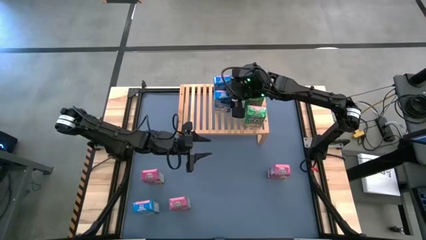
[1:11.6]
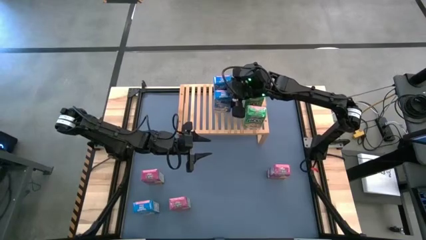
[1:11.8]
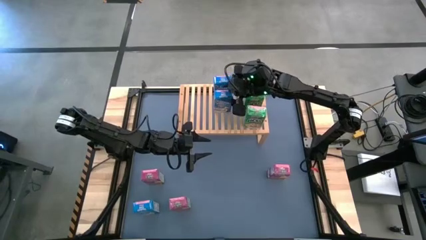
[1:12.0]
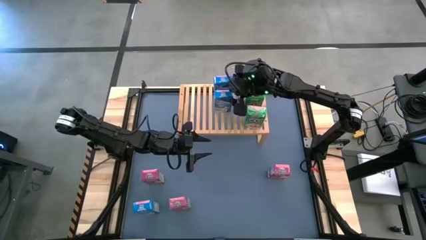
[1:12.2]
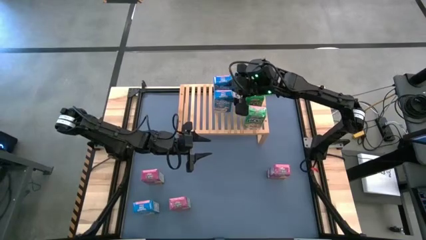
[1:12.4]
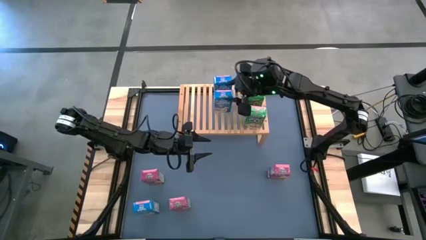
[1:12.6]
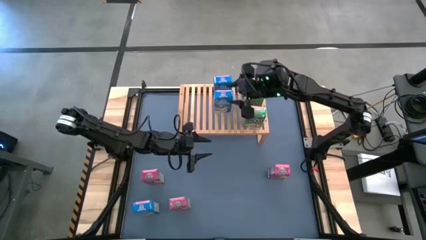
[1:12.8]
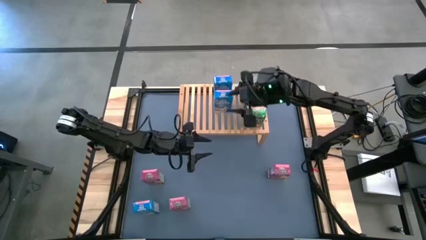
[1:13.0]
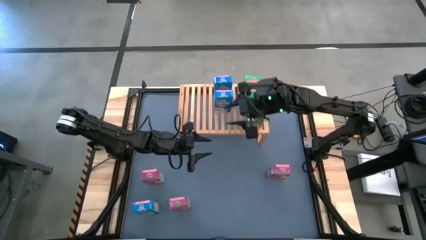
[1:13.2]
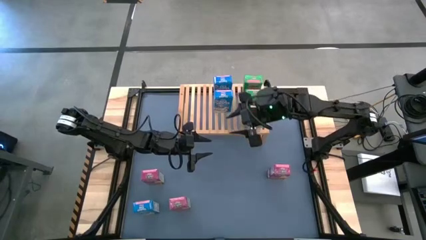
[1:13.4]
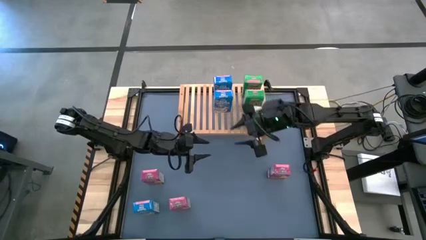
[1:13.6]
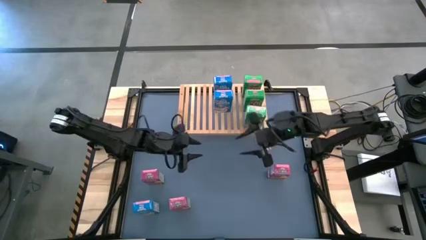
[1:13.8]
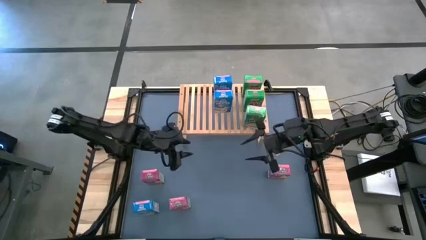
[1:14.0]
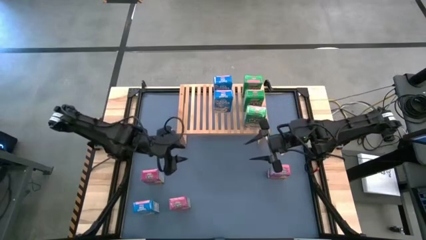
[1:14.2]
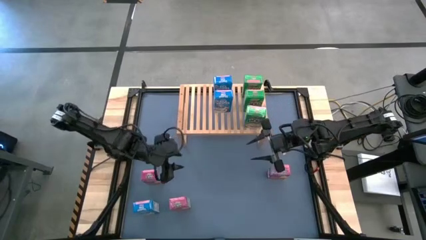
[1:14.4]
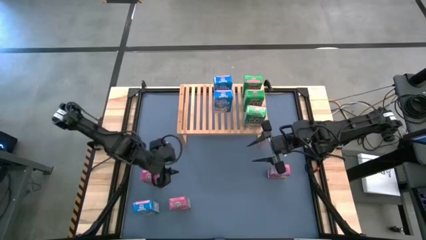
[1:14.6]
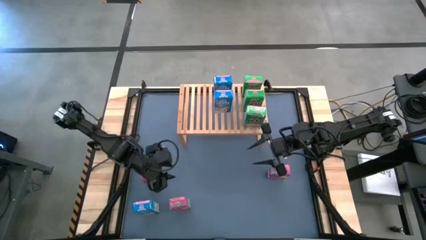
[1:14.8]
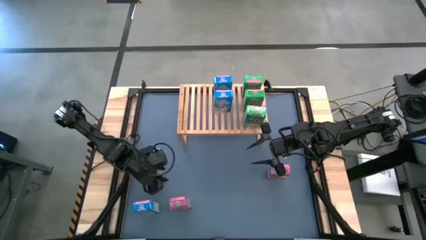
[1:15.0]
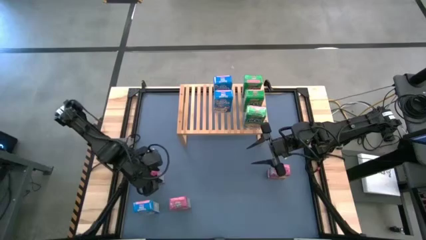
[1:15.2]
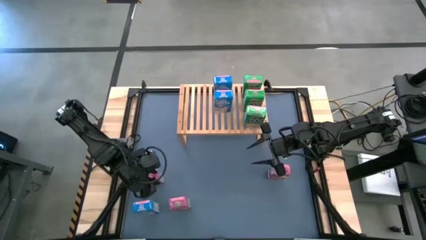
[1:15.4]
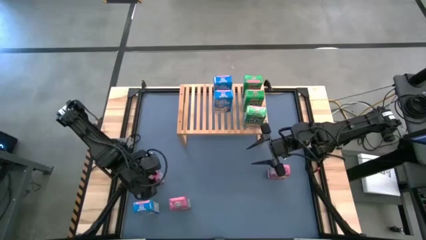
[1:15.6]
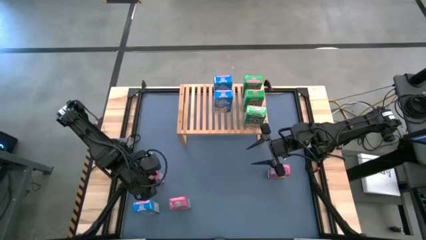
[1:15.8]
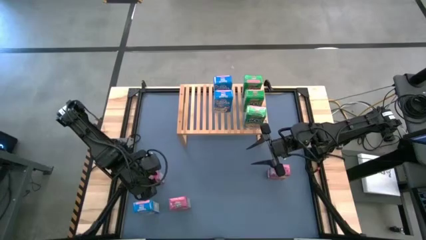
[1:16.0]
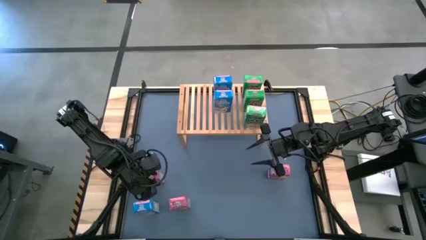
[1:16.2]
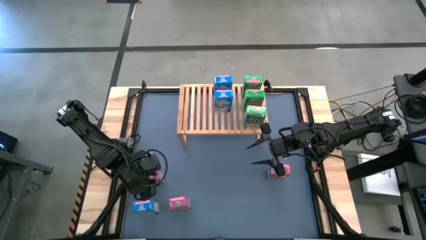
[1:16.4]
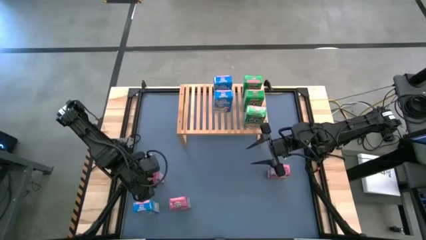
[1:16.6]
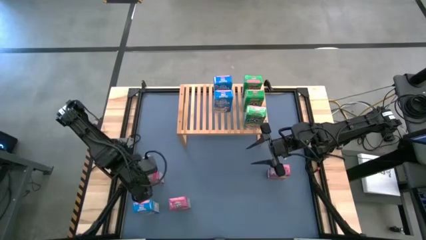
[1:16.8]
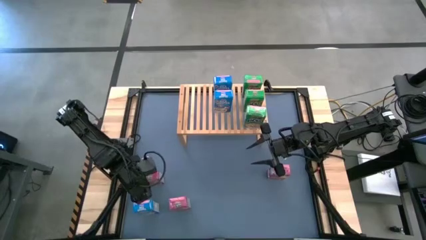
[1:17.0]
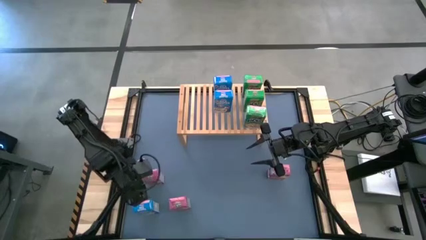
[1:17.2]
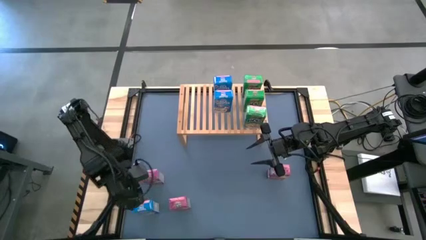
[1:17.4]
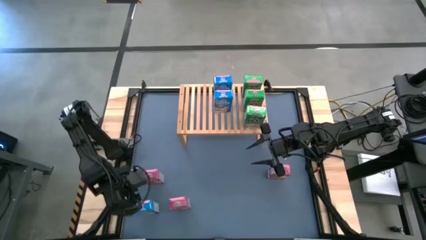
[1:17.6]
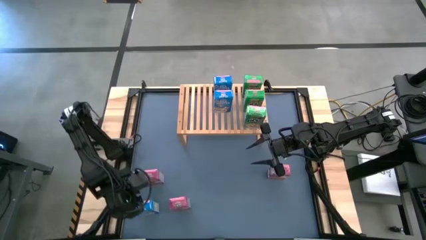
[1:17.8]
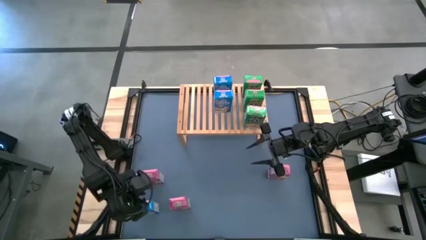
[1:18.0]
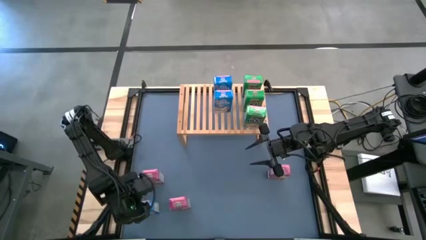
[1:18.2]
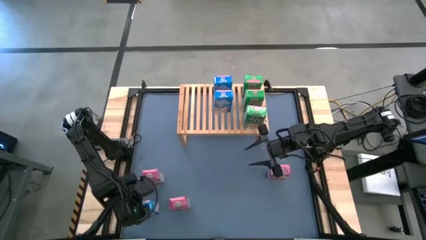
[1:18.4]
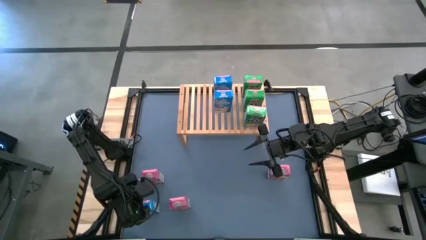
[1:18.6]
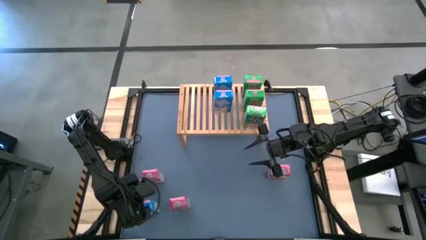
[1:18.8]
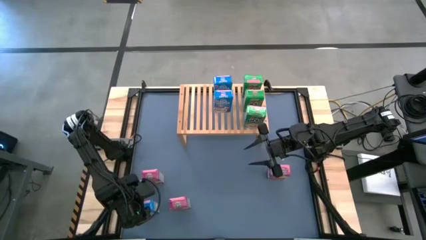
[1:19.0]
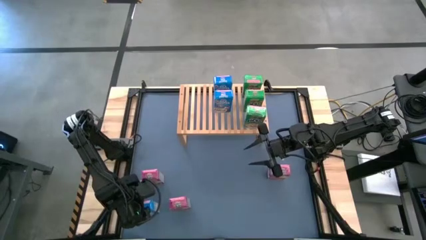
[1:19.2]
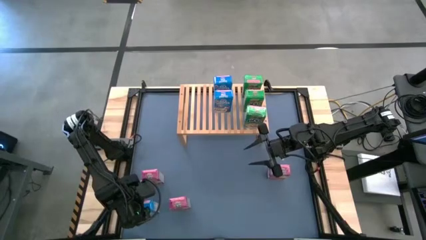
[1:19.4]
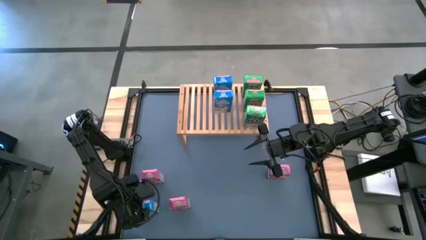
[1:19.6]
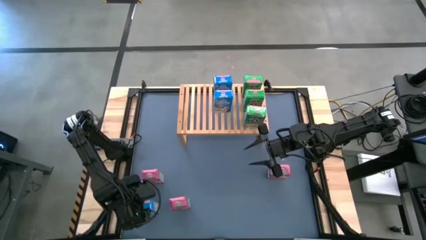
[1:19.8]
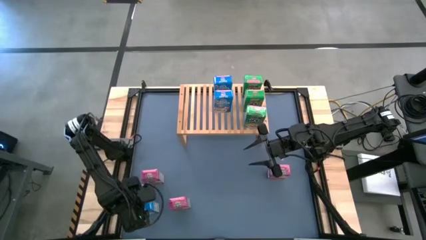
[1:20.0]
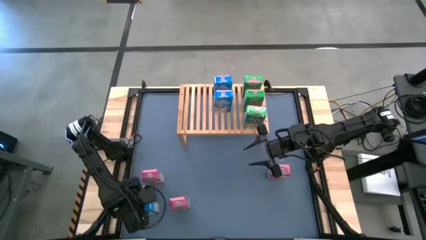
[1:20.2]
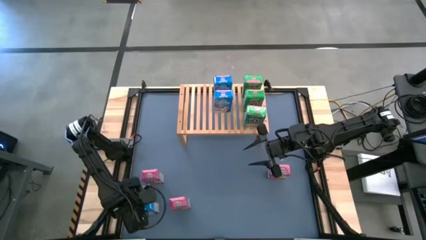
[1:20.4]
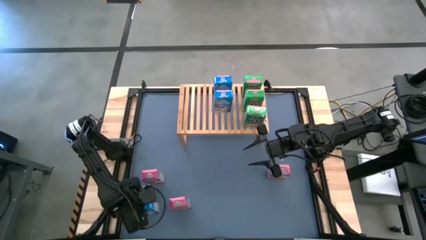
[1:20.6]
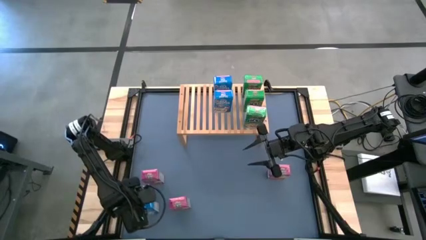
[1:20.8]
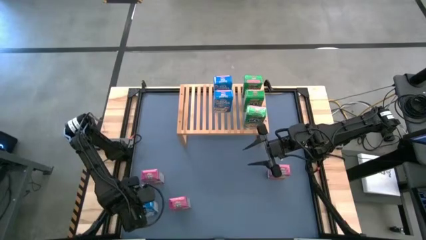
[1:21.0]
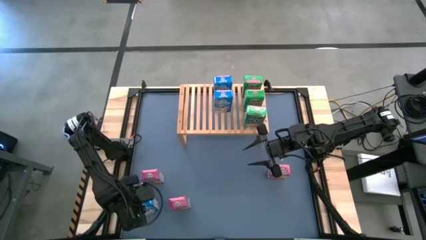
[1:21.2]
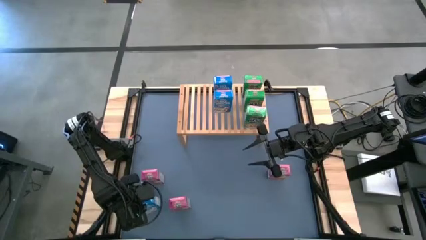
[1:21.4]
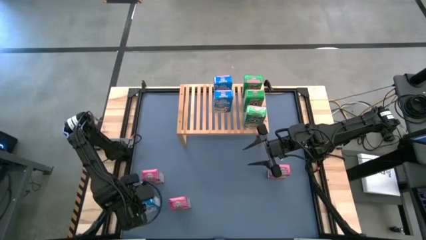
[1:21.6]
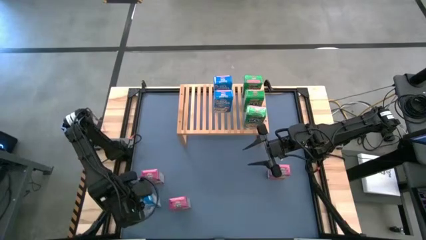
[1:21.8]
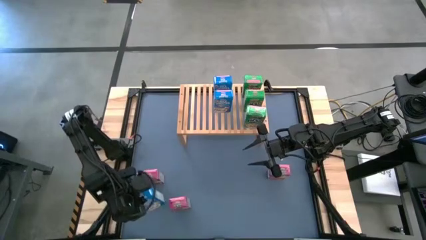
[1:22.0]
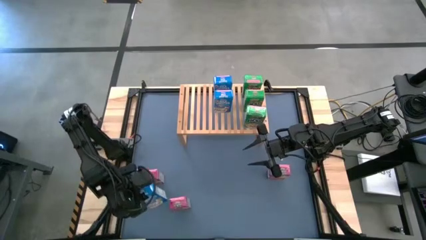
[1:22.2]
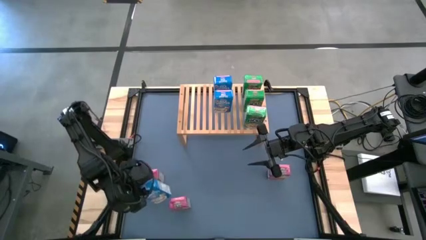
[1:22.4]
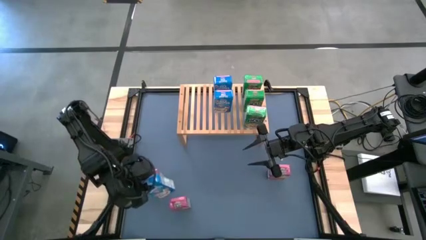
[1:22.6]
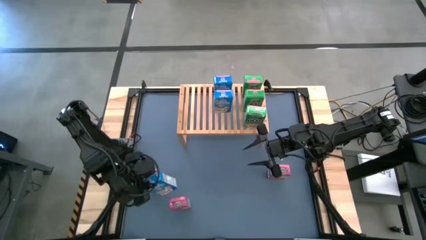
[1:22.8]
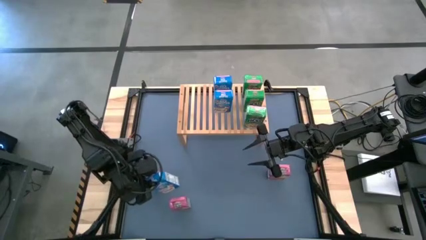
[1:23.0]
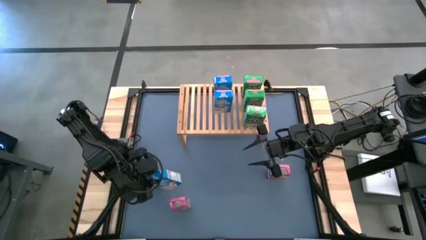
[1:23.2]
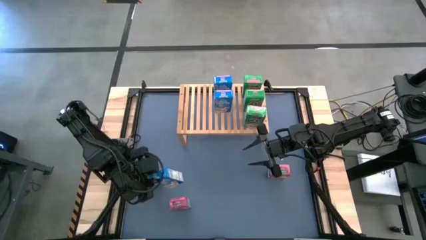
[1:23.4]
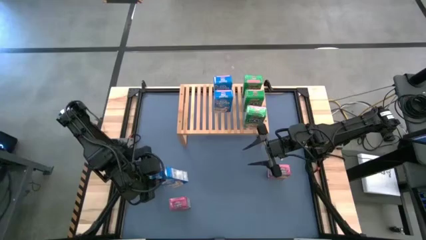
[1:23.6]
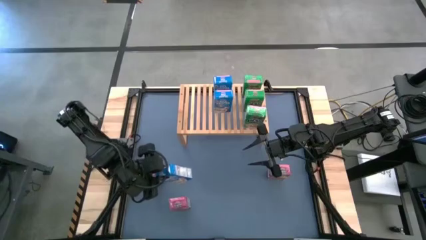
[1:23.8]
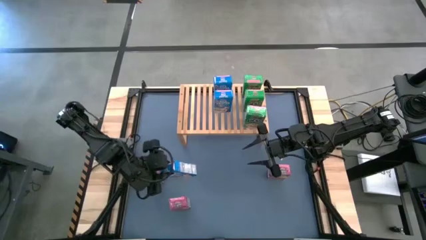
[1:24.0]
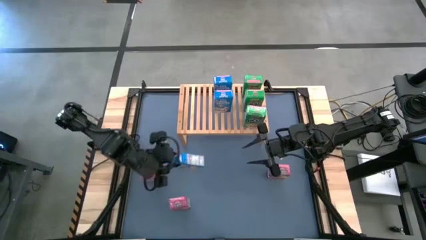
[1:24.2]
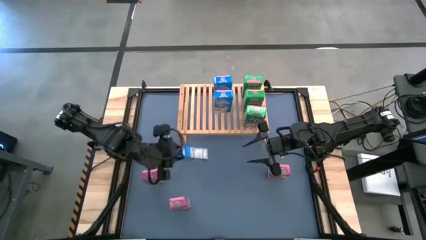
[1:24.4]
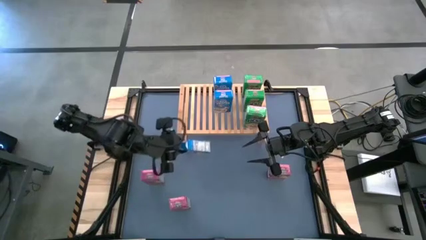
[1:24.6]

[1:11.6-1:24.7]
Task: Stack cereal on shelf
Put the blue cereal box on the shelf aligned with the other blue cereal boxes
